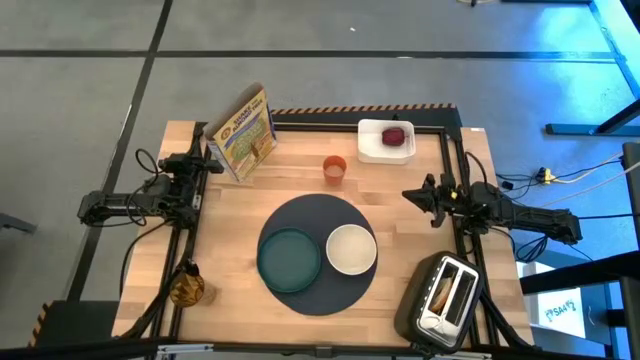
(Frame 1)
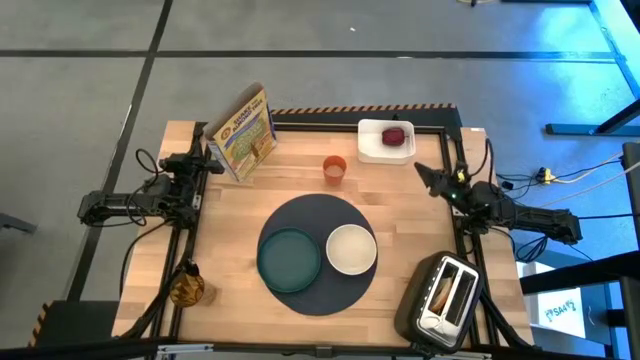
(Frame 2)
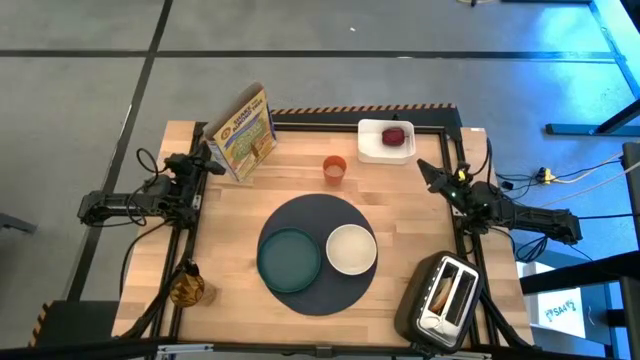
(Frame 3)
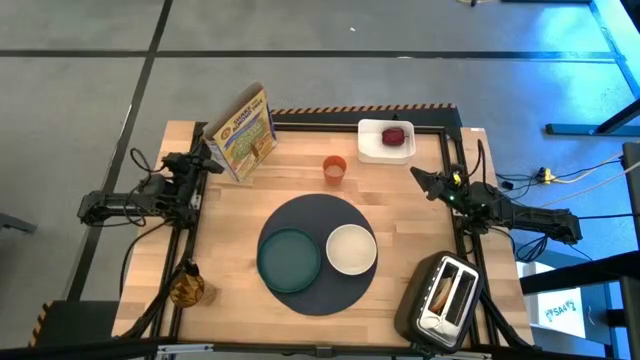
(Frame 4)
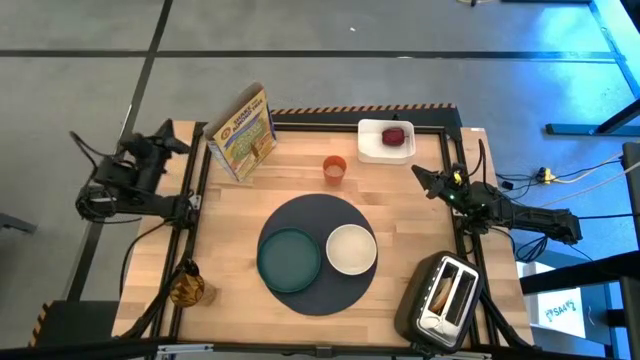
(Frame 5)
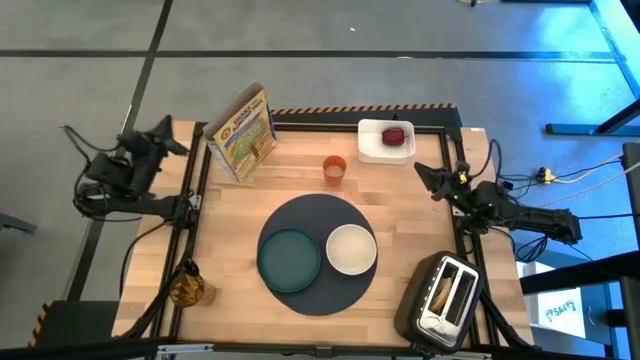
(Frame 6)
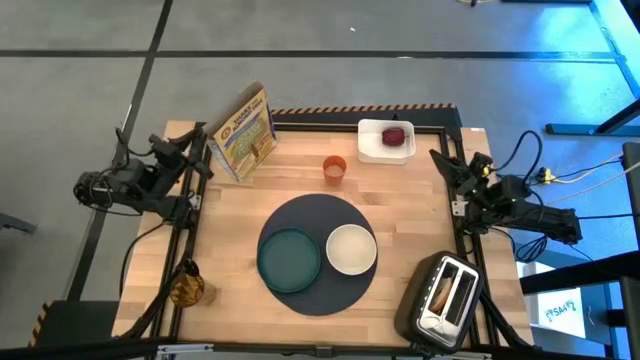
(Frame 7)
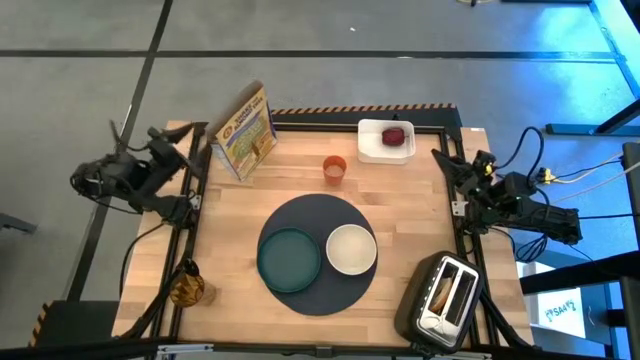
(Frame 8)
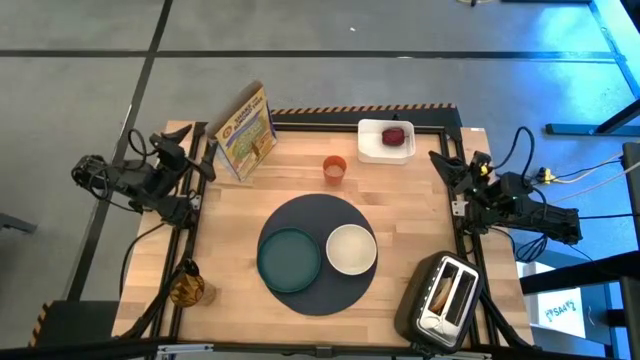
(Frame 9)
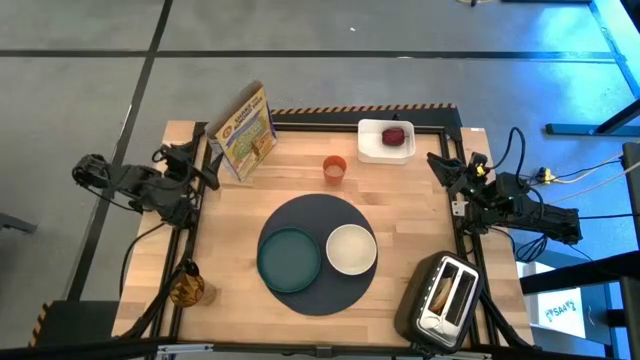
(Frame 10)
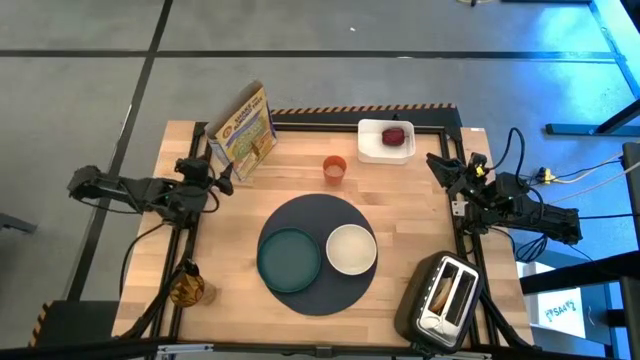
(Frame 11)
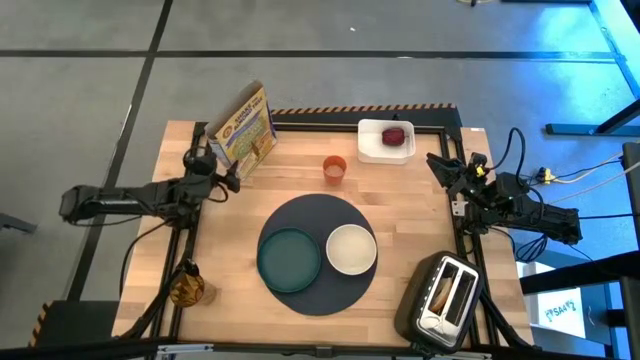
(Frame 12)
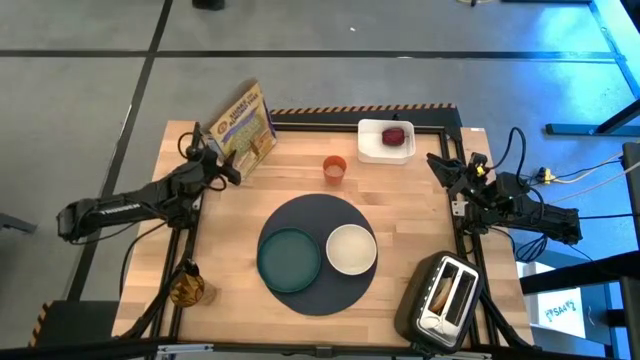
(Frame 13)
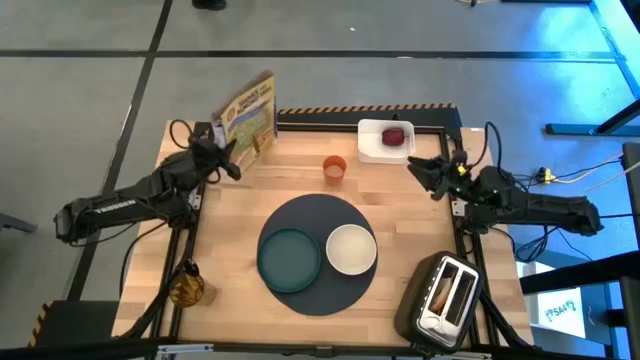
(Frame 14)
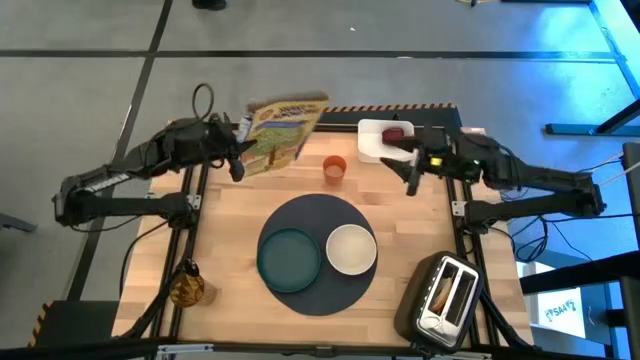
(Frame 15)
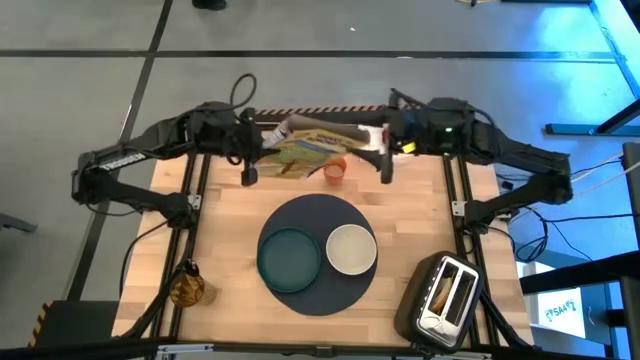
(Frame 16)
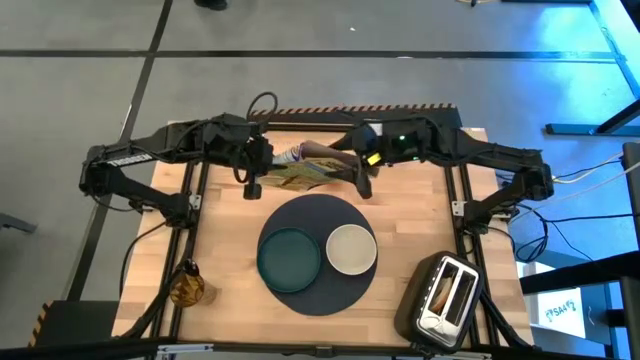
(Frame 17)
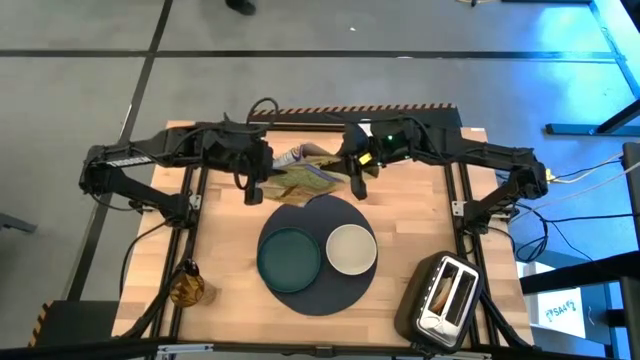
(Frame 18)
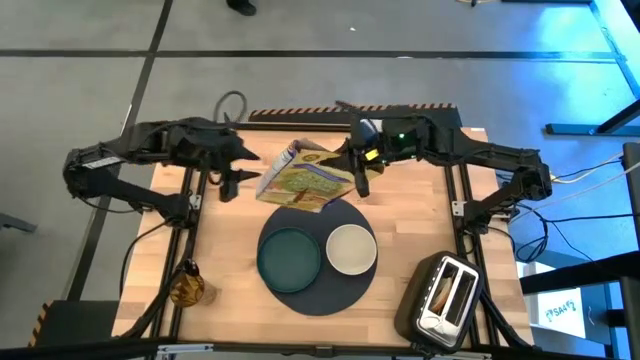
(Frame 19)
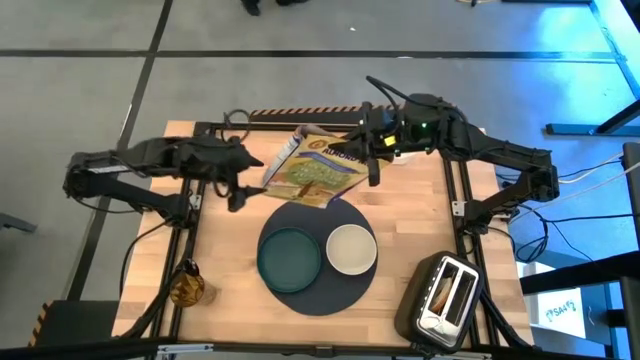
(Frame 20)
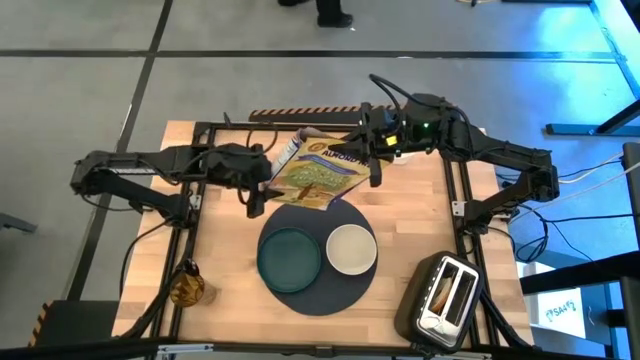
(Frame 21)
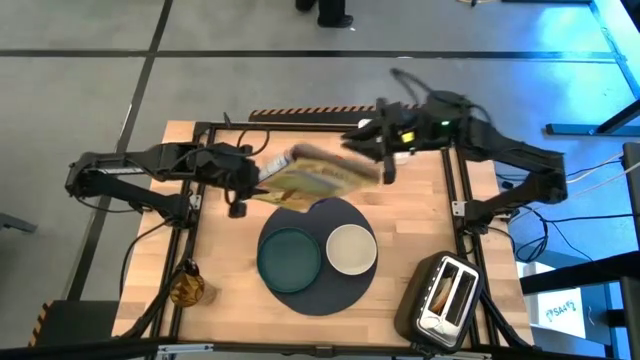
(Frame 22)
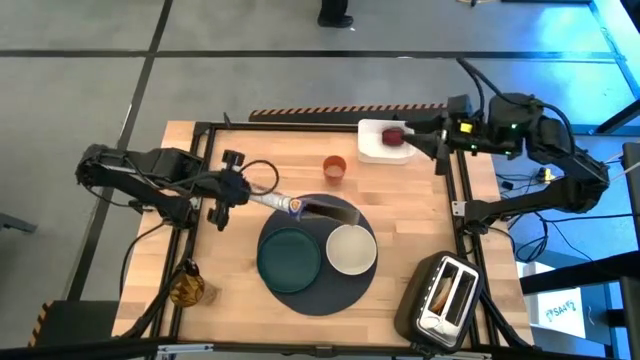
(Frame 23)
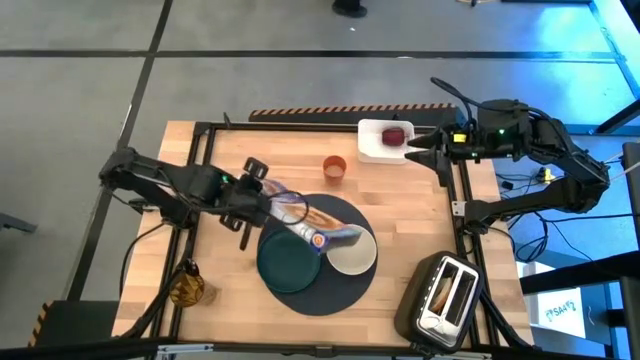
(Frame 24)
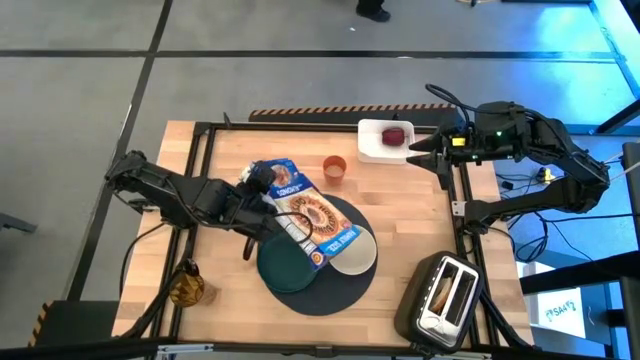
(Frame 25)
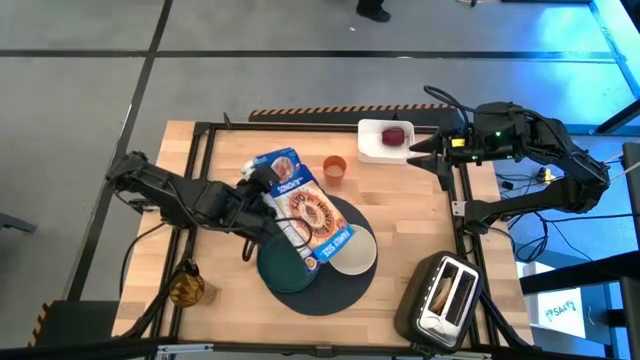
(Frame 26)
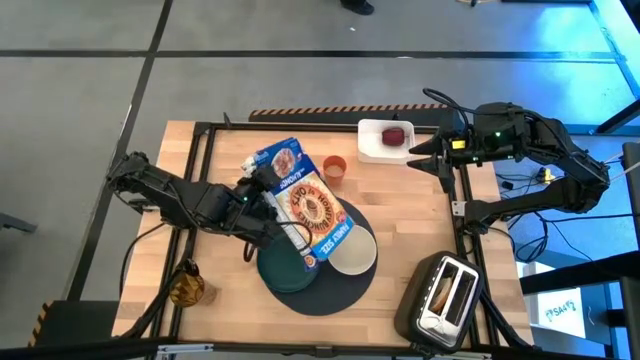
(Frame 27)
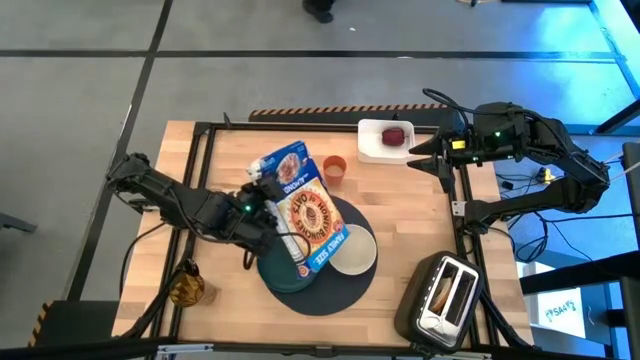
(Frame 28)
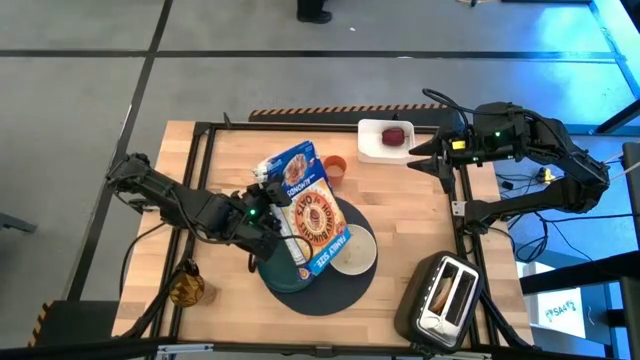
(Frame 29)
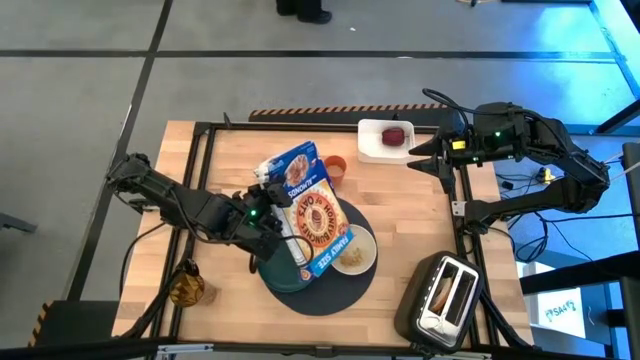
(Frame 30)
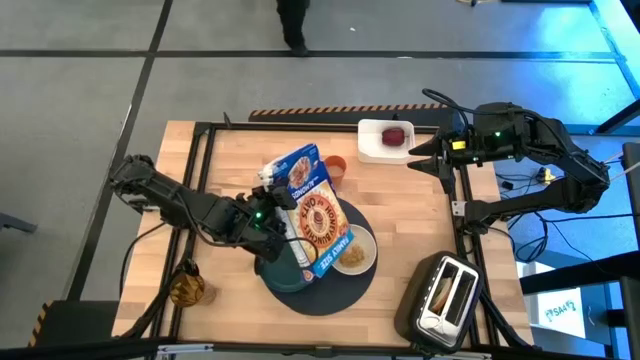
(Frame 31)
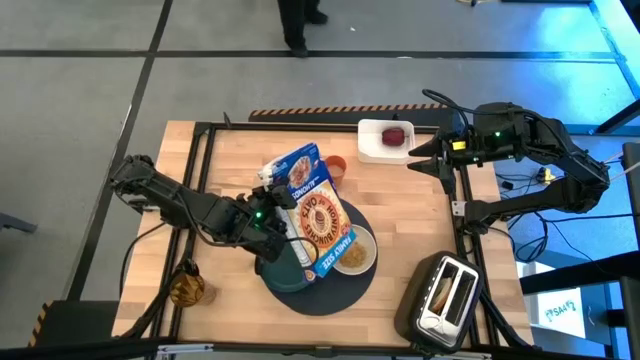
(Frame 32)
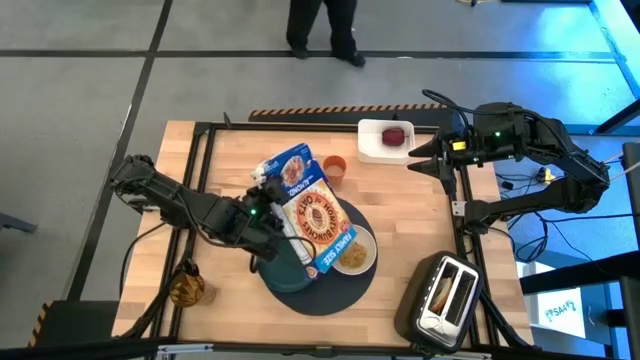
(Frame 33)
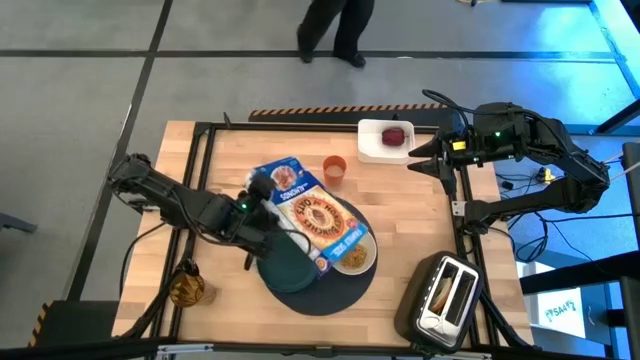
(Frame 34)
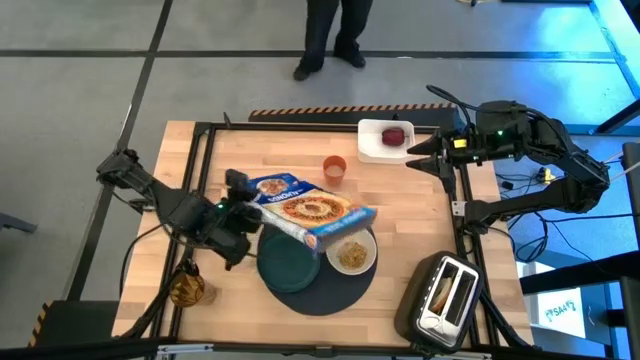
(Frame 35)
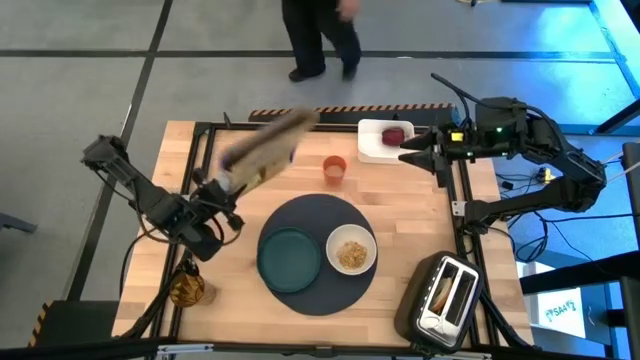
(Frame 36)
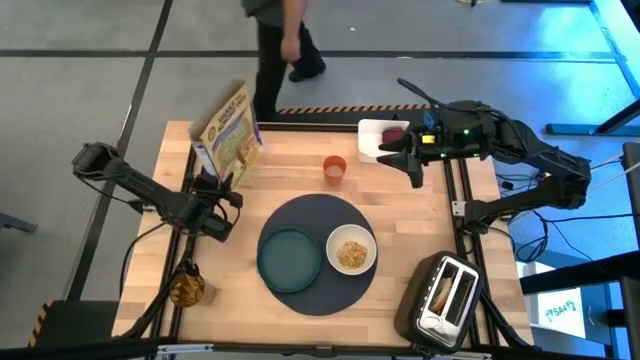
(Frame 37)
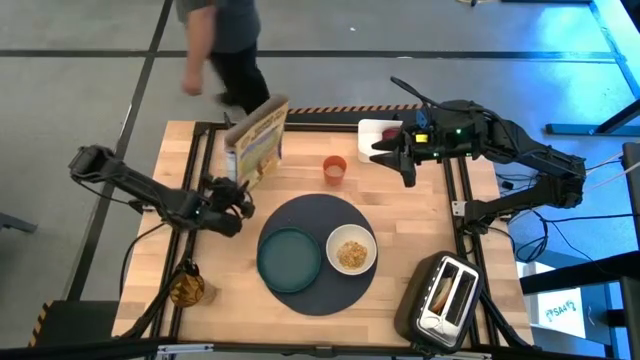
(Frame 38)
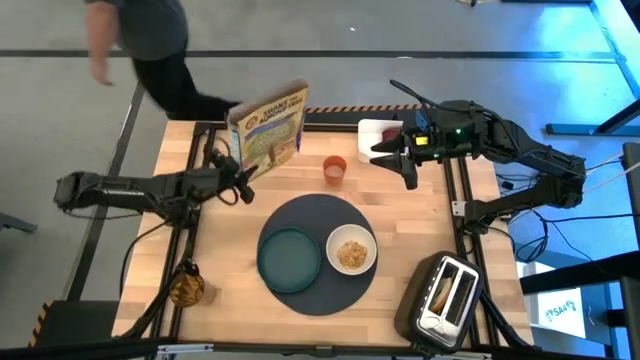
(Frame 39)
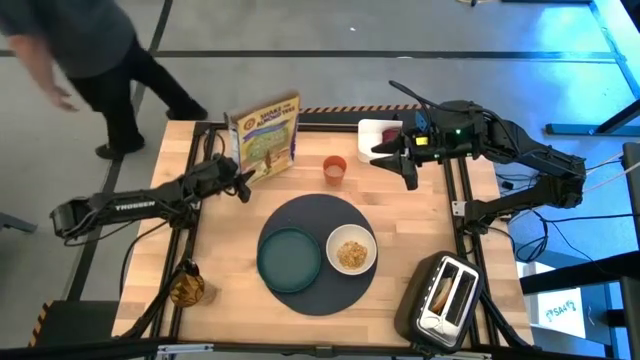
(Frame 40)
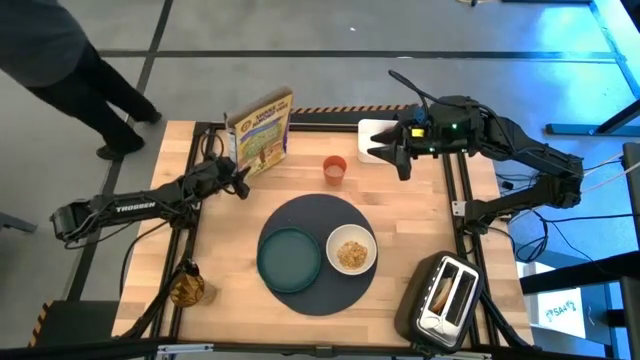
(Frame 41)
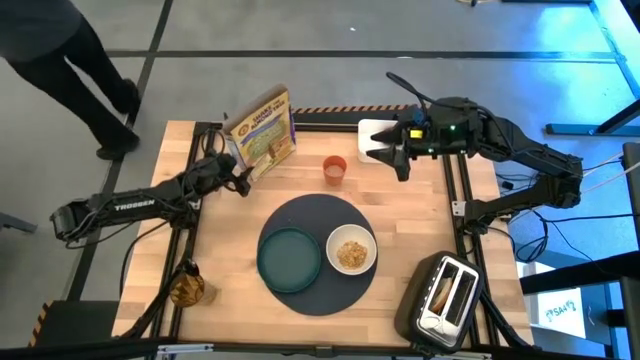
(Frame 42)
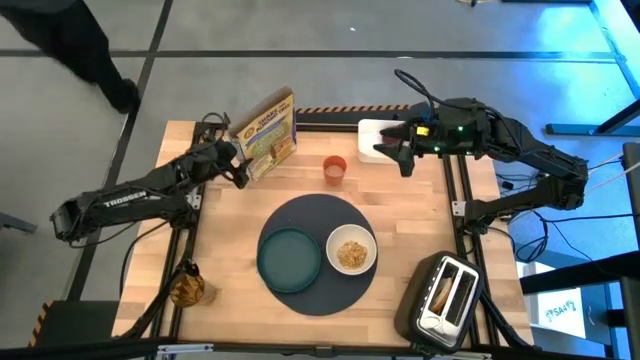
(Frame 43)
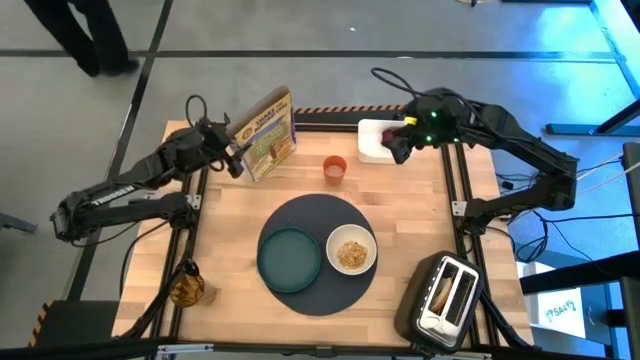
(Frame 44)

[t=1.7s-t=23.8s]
Task: Arrange a breakfast setting
Pour the cereal from the blue cereal box into the white bowl
